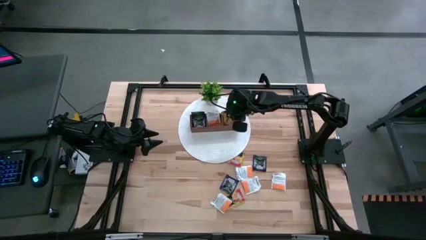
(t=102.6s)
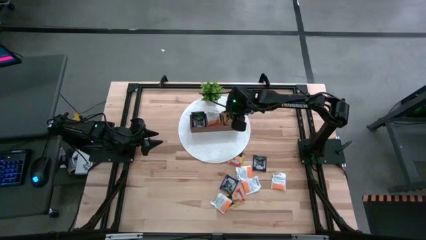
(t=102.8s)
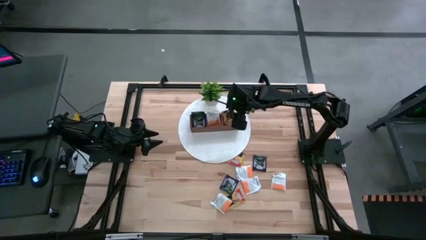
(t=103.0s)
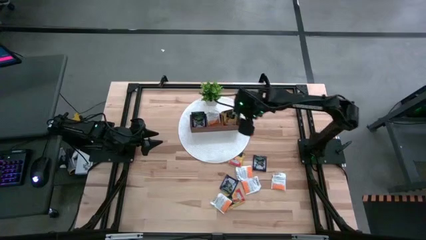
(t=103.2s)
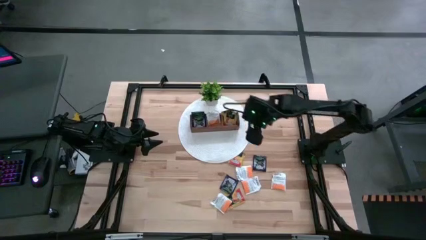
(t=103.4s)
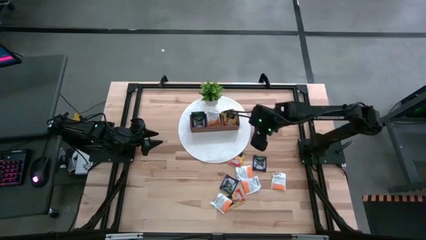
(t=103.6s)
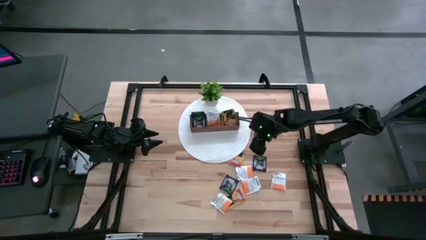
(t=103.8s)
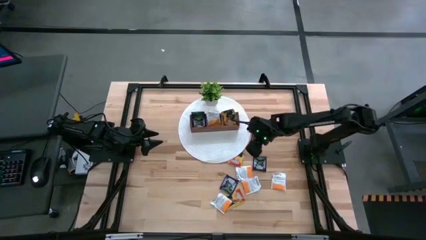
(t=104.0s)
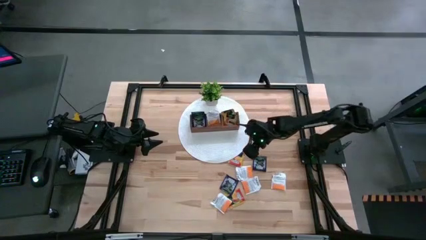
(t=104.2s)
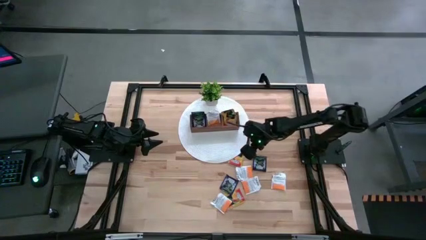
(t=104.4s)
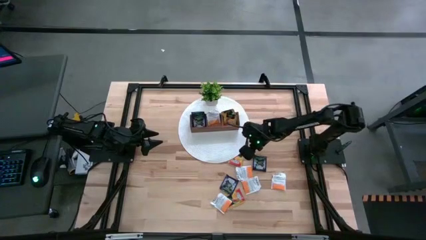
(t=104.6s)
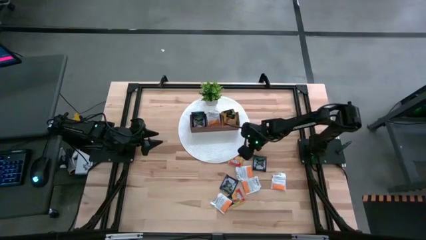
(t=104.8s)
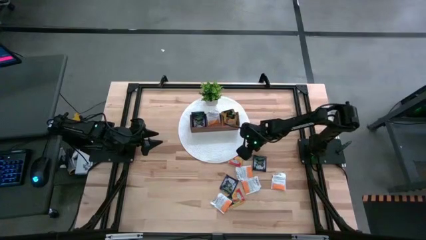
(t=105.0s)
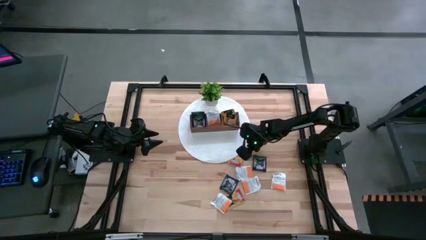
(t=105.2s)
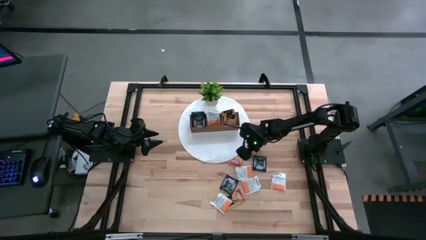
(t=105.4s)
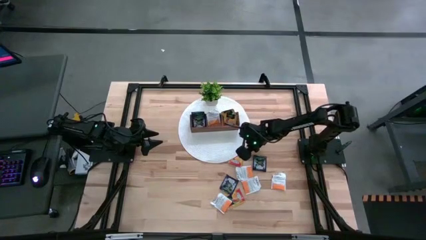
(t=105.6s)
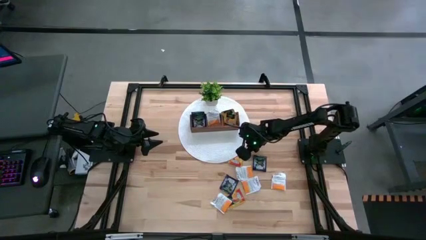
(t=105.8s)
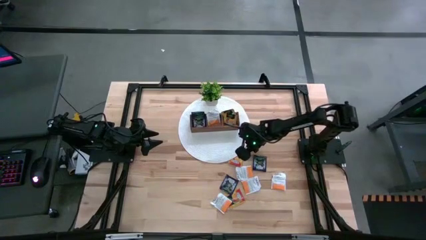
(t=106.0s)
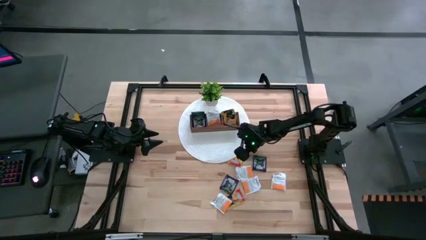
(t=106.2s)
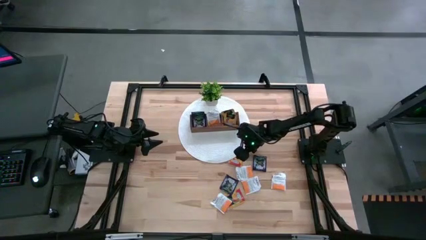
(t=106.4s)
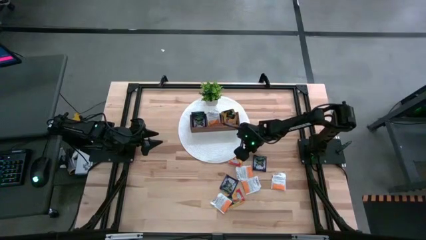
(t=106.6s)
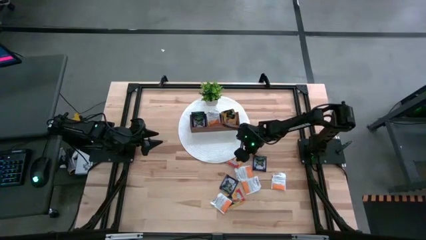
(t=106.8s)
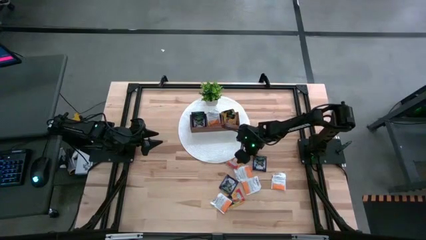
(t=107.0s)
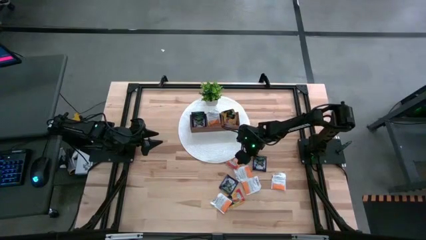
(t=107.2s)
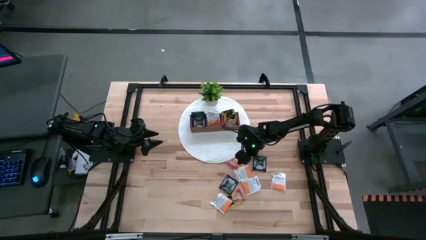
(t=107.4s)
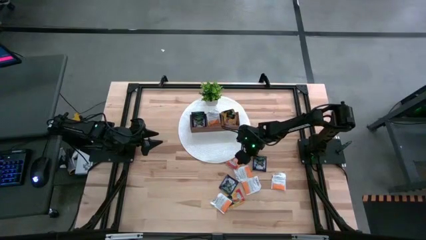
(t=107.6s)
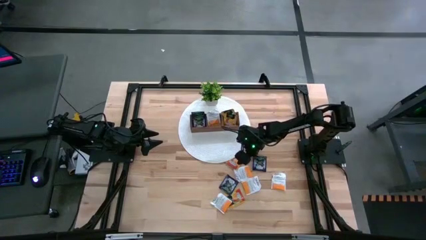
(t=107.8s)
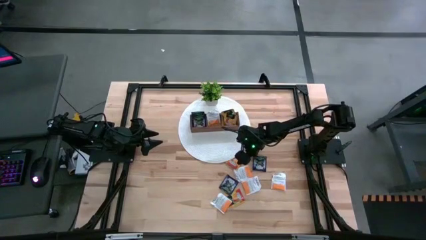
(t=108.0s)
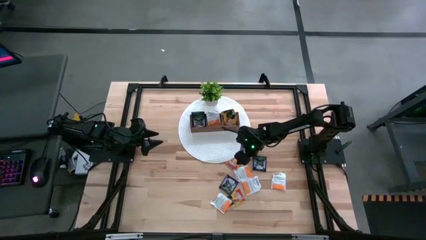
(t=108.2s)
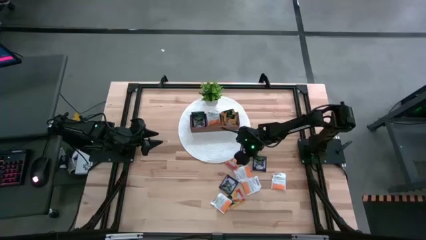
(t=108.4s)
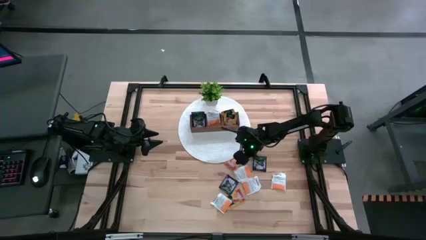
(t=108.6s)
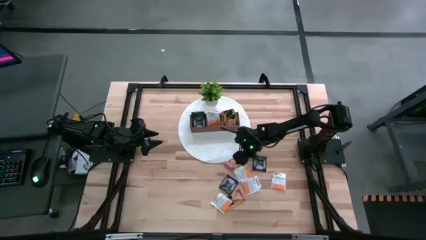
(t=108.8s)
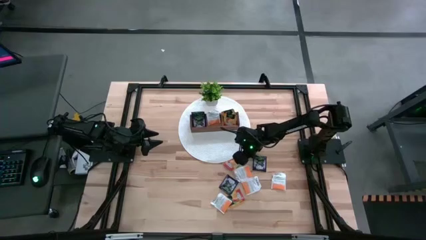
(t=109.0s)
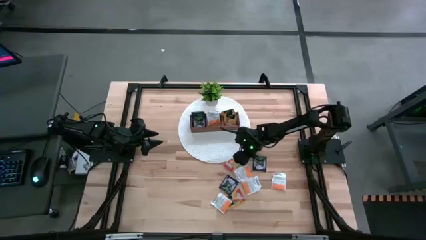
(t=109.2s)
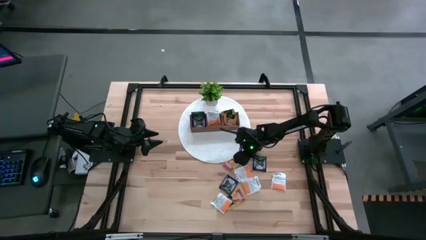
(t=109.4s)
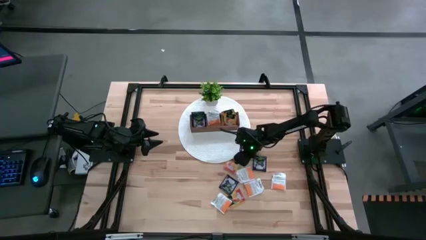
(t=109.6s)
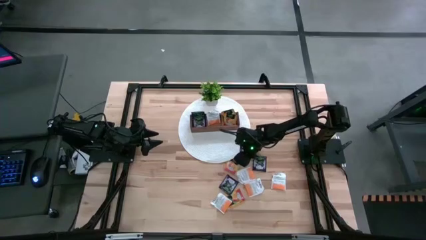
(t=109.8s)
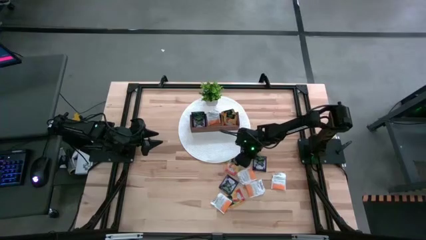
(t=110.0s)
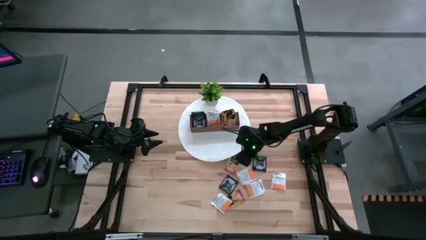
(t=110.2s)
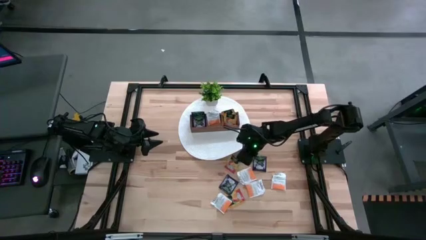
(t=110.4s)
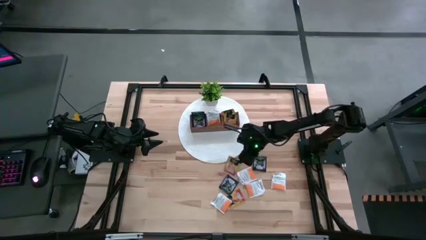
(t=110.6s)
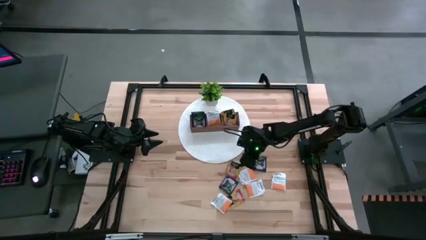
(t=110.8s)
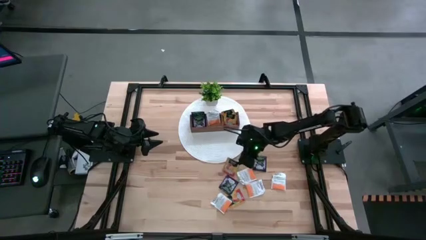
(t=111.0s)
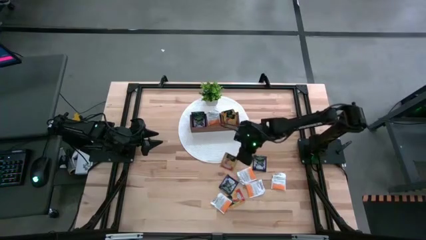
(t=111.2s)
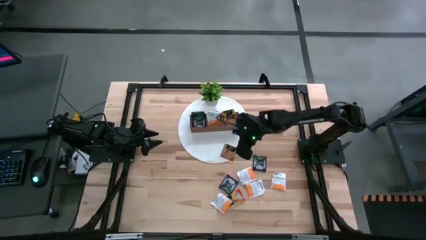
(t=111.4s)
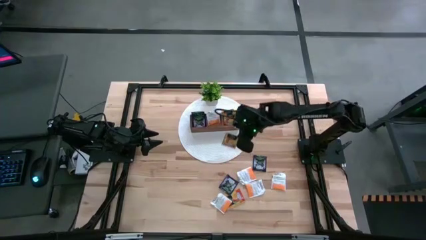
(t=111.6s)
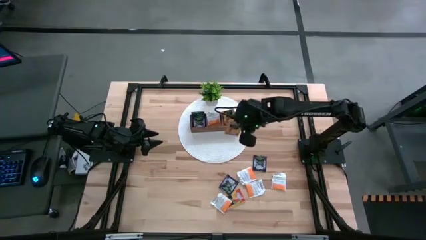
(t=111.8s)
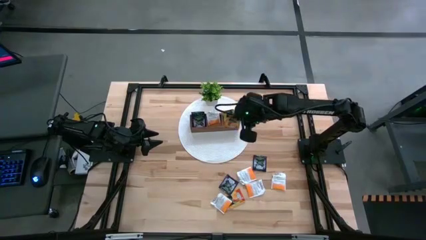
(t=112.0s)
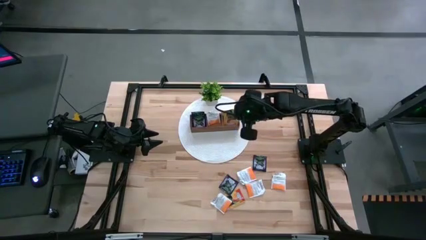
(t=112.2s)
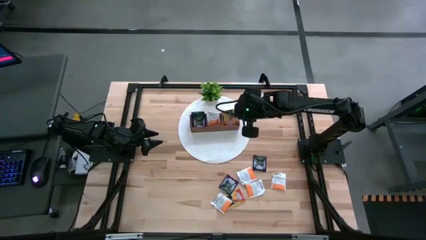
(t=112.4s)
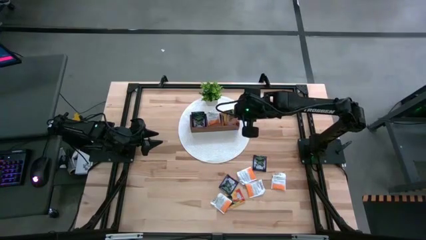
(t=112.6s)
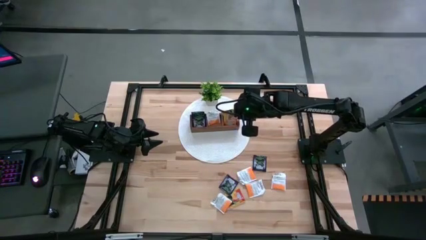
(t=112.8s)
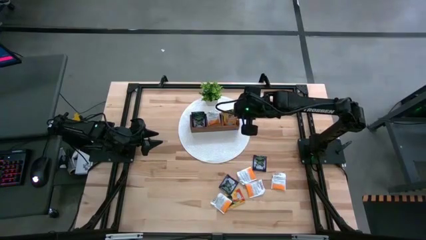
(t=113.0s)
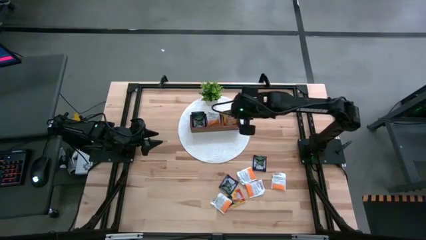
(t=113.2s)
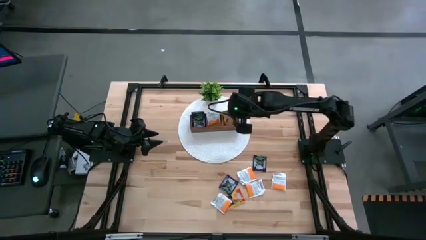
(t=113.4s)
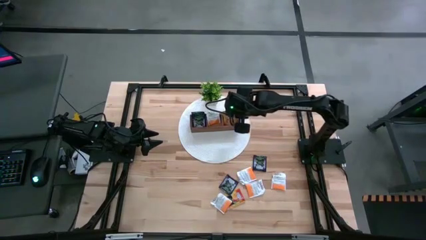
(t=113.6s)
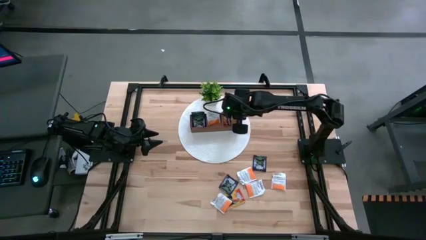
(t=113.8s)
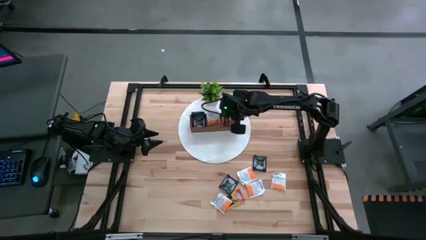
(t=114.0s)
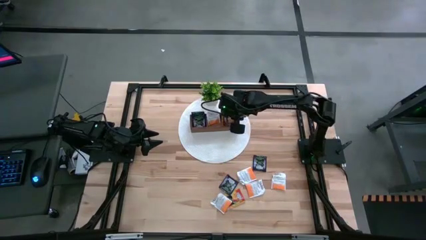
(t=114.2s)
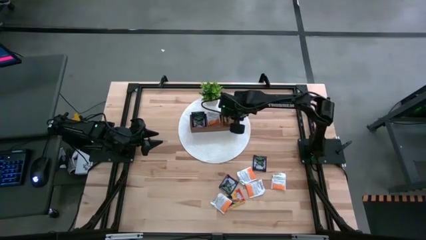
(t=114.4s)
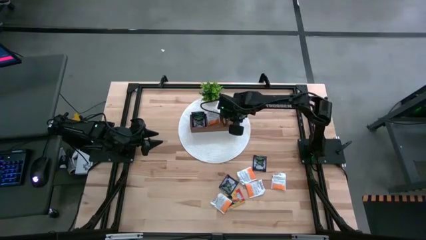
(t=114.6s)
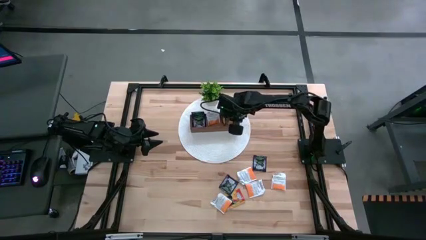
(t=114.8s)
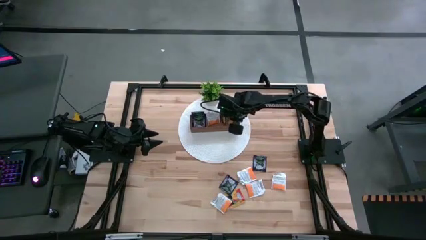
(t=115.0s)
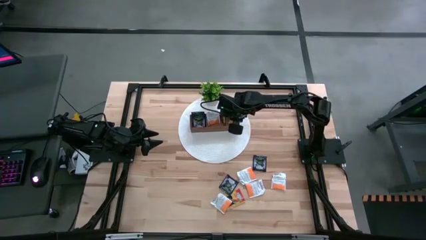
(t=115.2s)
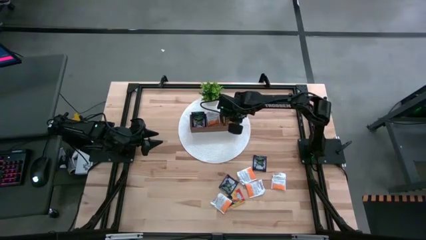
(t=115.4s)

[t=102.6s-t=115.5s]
Task: Pick & Place Tea
Put the orange tea bag into the right section of the wooden organizer

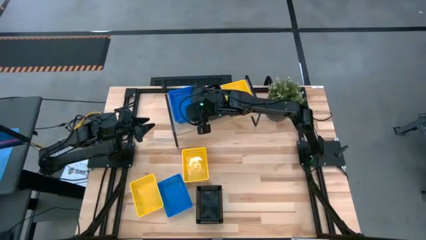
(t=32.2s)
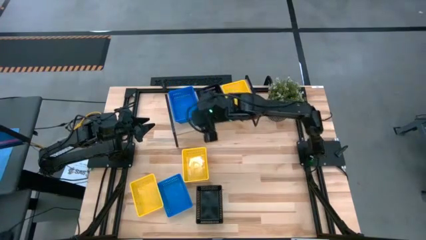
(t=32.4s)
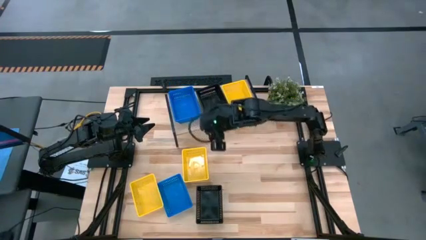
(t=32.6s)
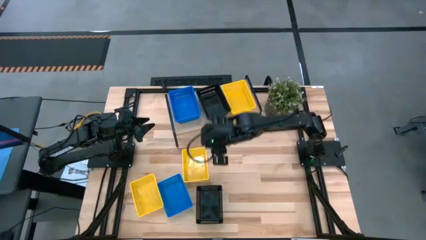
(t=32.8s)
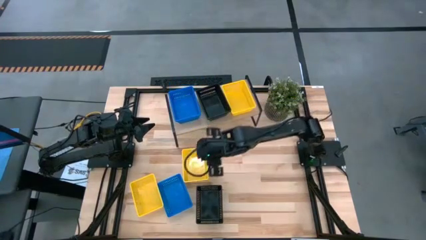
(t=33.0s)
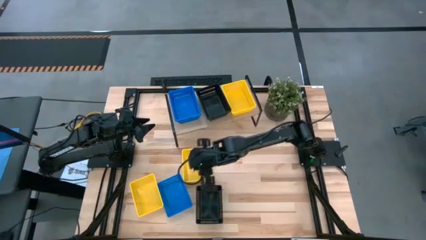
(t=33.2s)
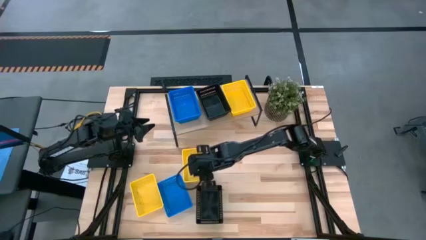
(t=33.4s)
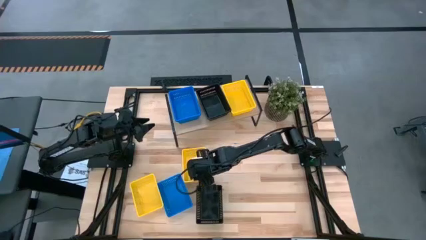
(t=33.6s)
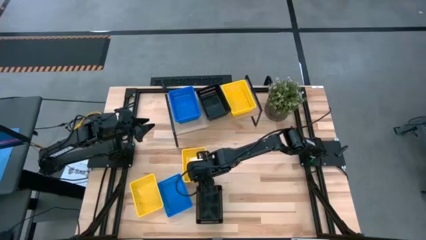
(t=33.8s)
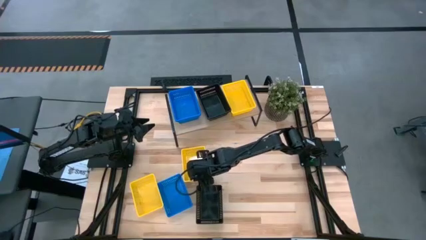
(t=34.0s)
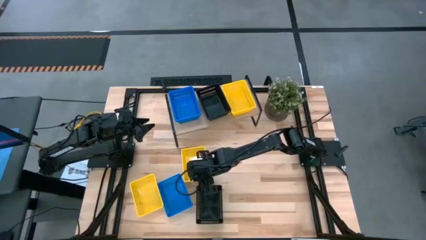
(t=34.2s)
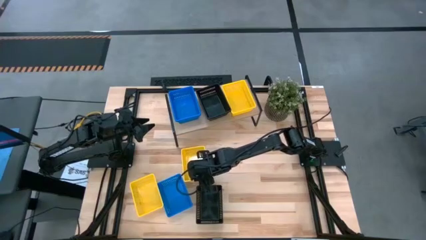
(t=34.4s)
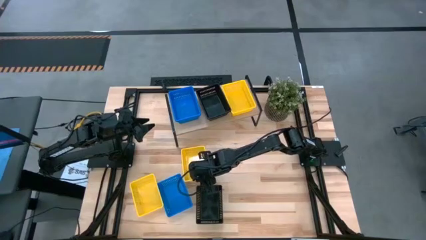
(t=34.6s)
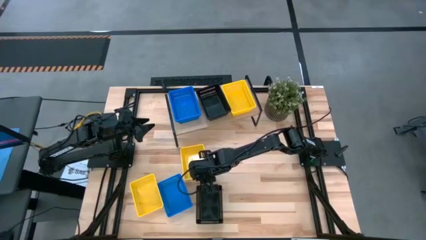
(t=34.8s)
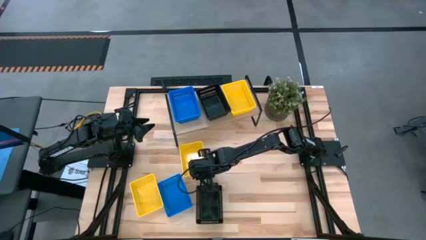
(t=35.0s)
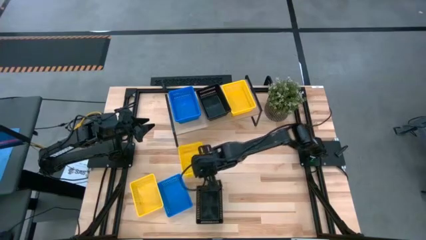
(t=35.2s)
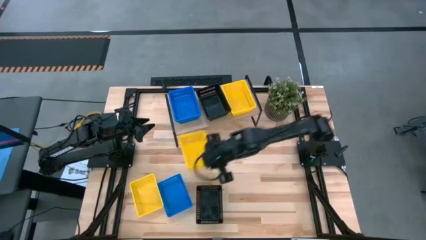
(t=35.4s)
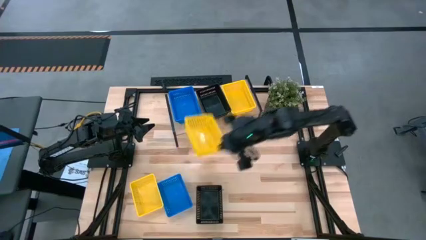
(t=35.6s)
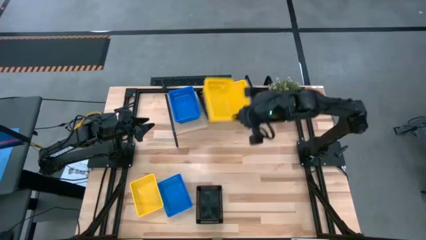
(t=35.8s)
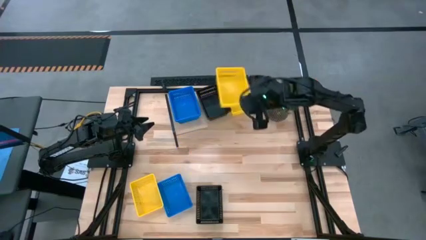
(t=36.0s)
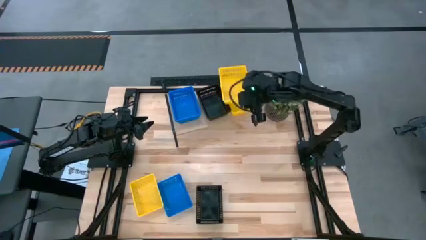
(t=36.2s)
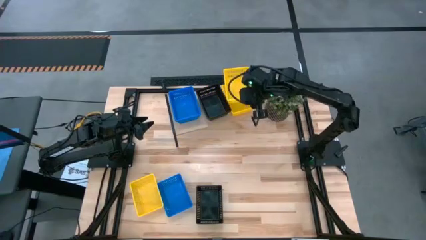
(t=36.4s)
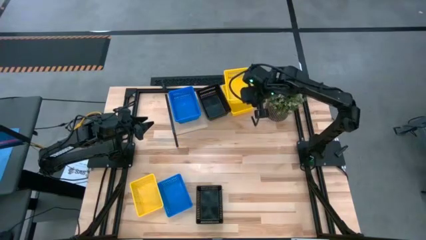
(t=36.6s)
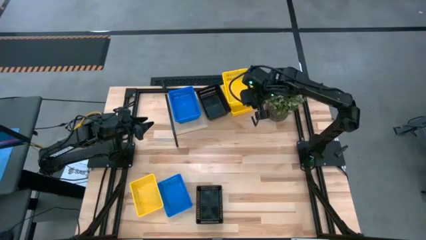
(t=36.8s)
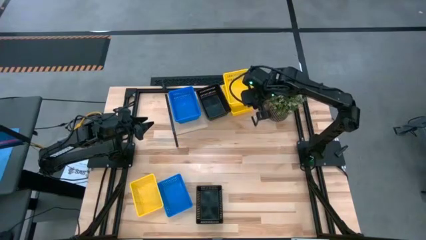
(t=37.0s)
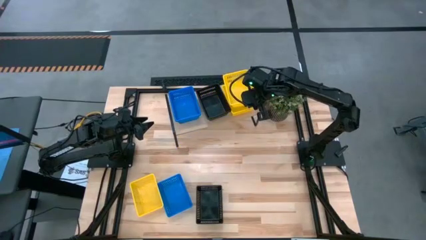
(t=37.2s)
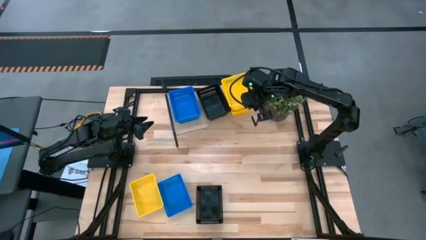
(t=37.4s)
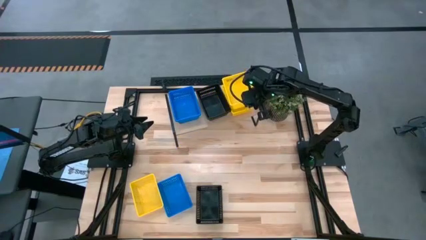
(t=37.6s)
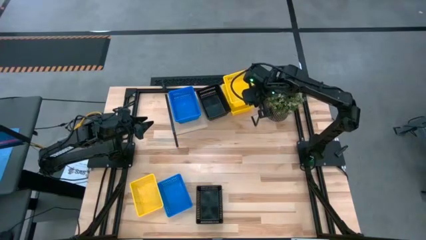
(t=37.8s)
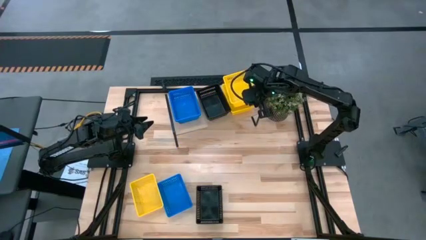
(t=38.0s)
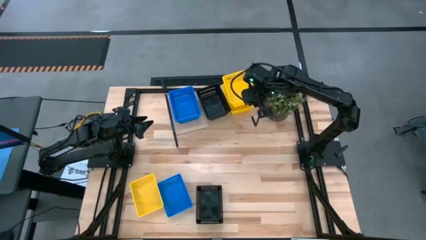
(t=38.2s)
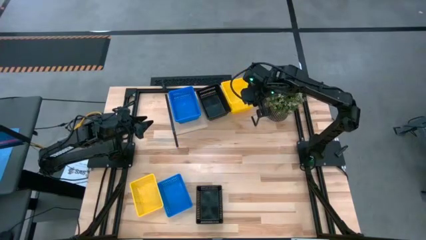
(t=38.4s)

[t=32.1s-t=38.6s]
Task: Stack baskets on shelf by color
Stack the top yellow bin on the yellow bin on the shelf
